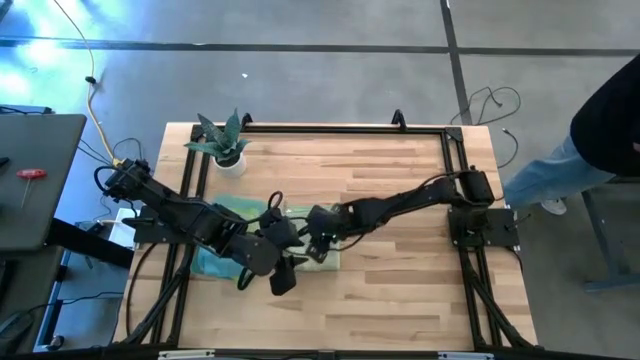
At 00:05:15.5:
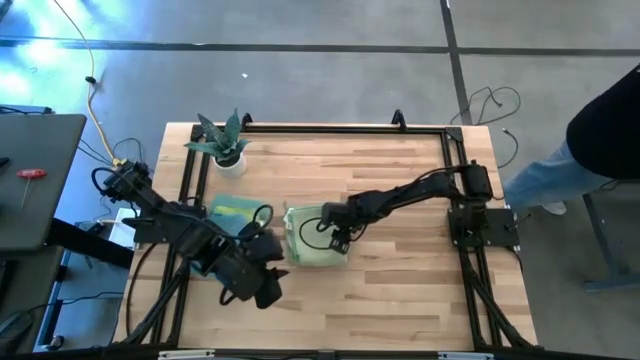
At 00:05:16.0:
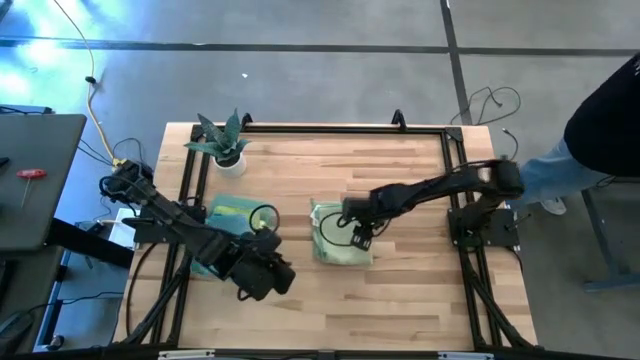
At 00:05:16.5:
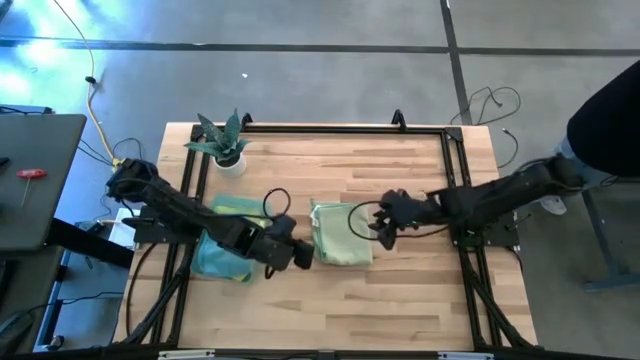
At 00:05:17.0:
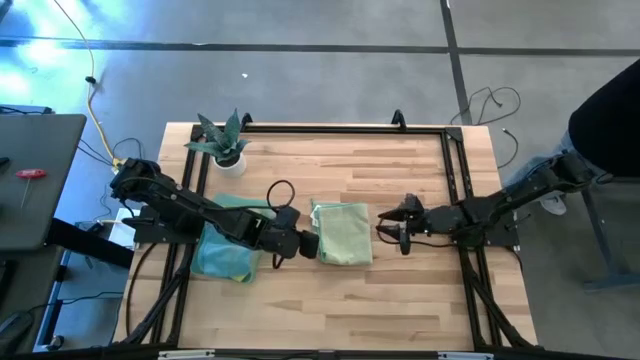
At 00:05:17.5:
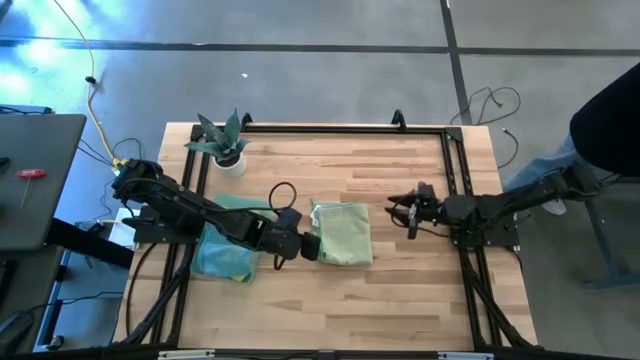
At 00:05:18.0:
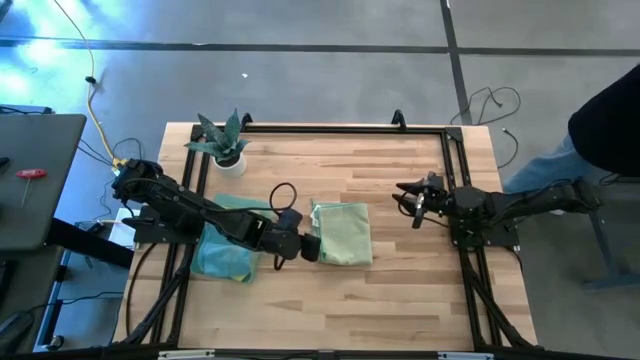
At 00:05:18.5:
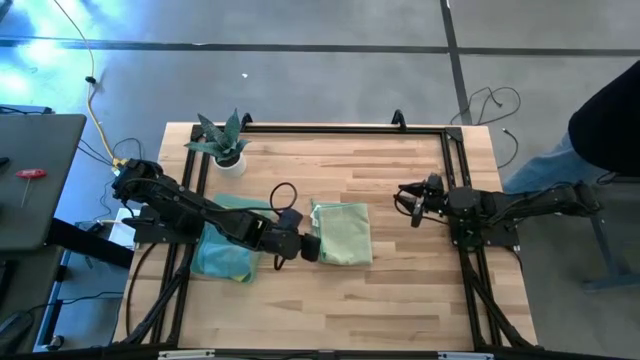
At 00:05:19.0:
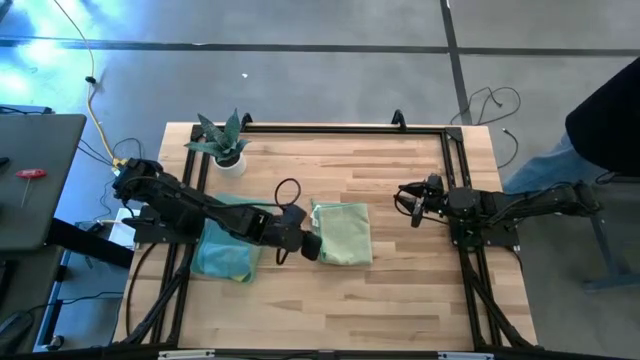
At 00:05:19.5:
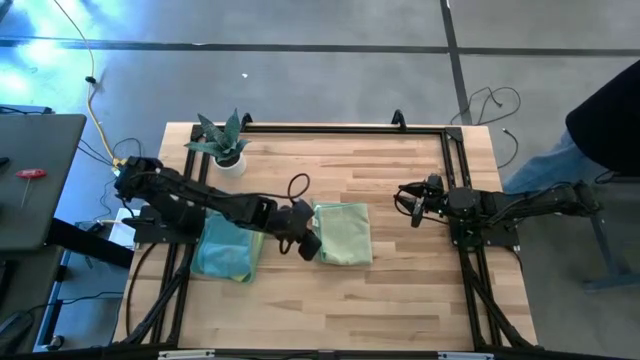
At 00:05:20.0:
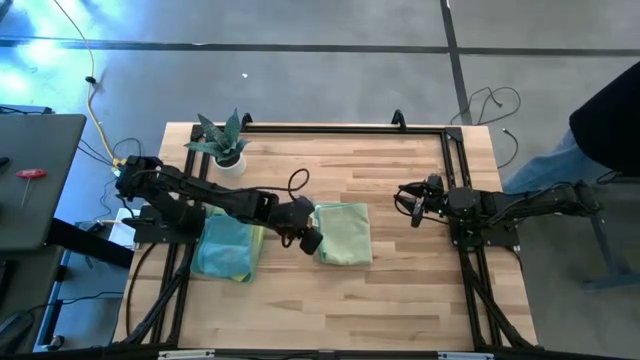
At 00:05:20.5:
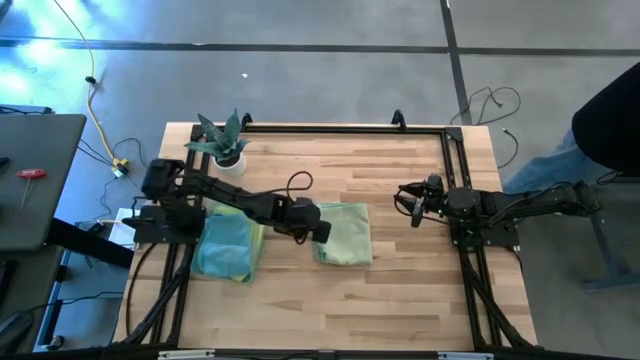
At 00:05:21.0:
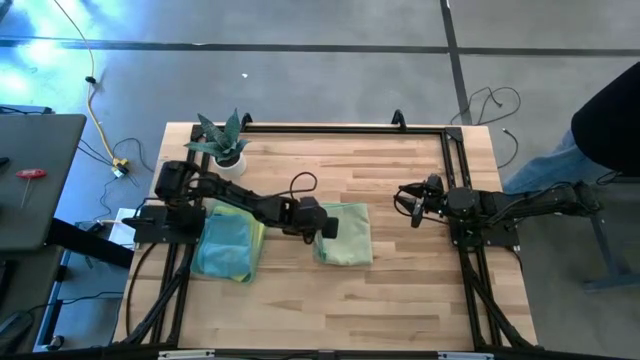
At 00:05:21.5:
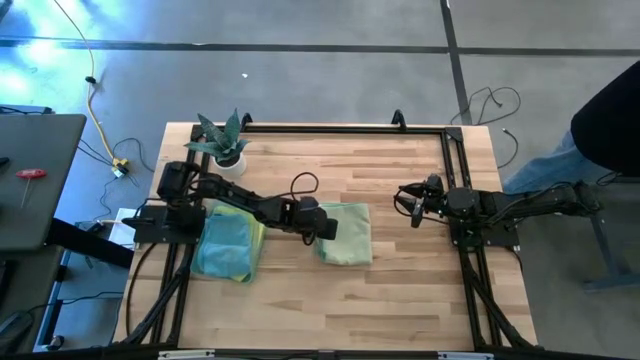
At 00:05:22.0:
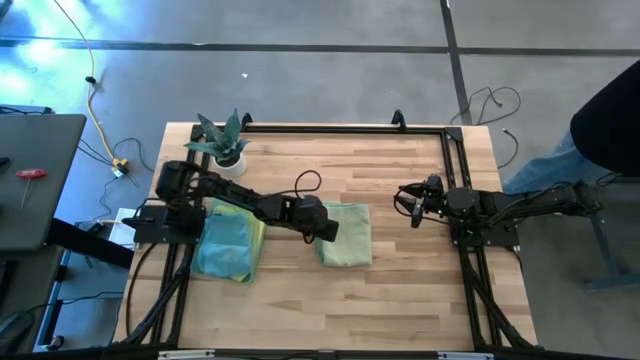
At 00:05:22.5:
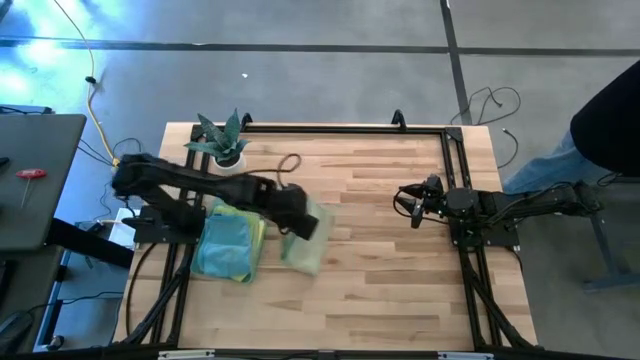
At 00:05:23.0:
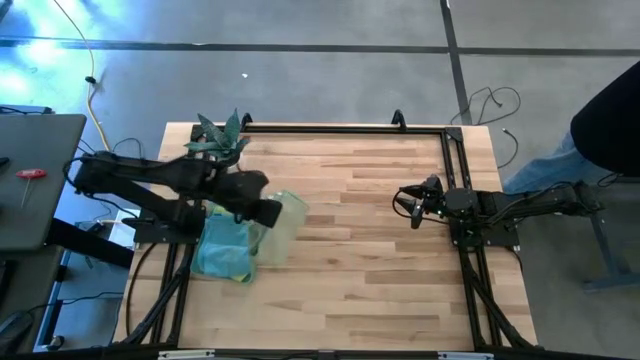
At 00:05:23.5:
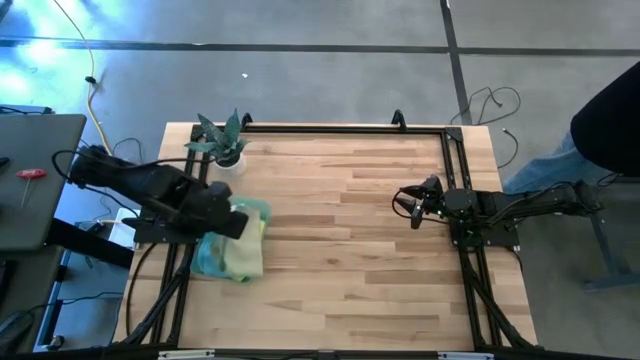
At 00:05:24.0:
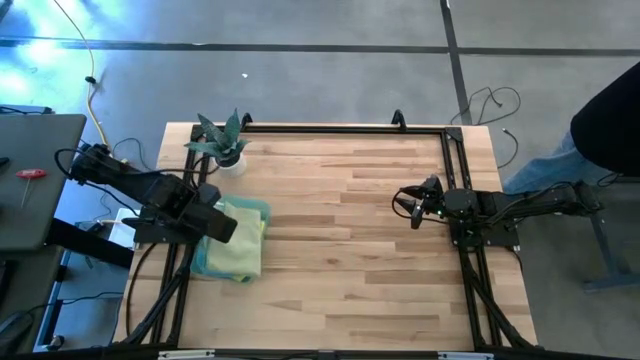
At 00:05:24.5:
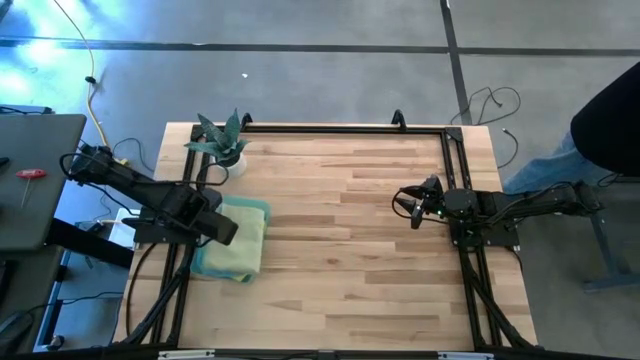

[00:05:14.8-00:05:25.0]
Task: Fold microfiber towels
Put the green microfiber towel into the green bin

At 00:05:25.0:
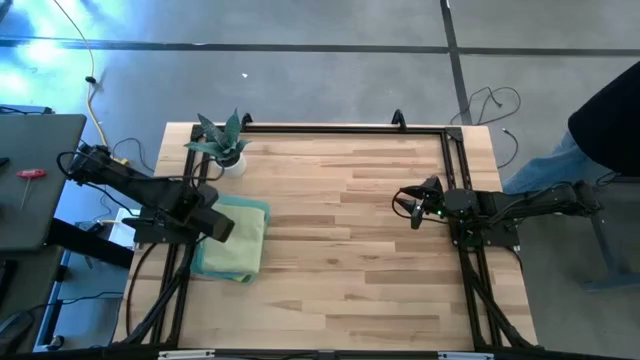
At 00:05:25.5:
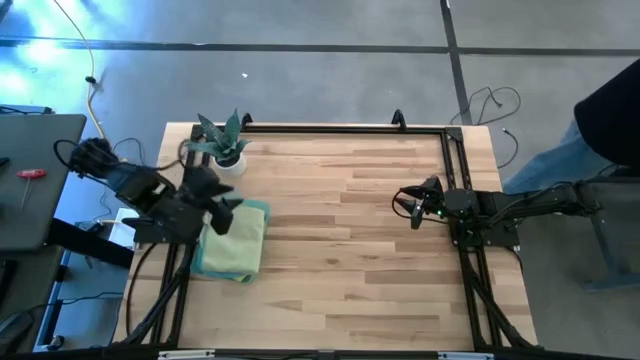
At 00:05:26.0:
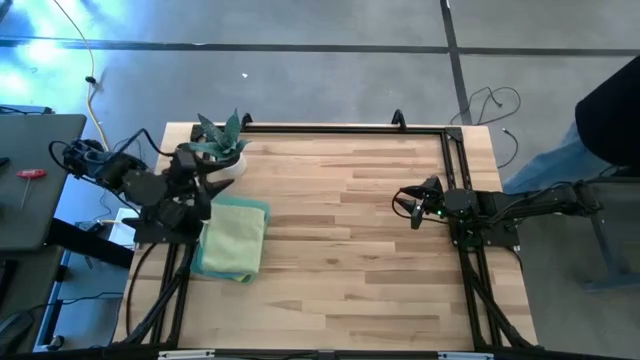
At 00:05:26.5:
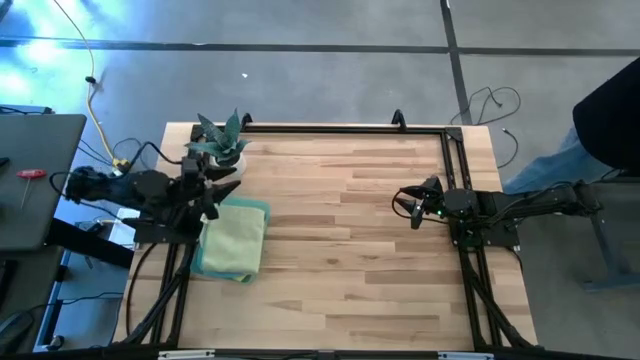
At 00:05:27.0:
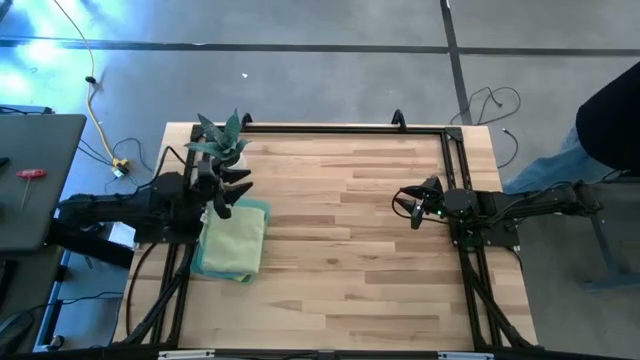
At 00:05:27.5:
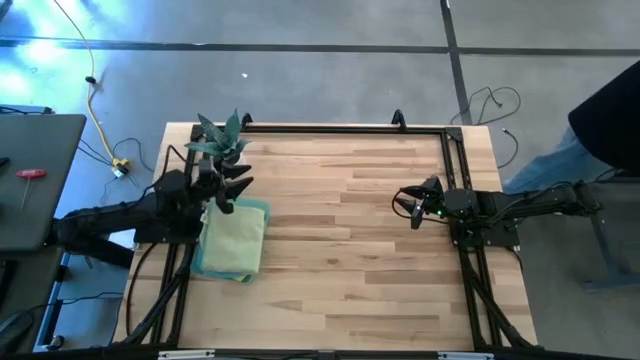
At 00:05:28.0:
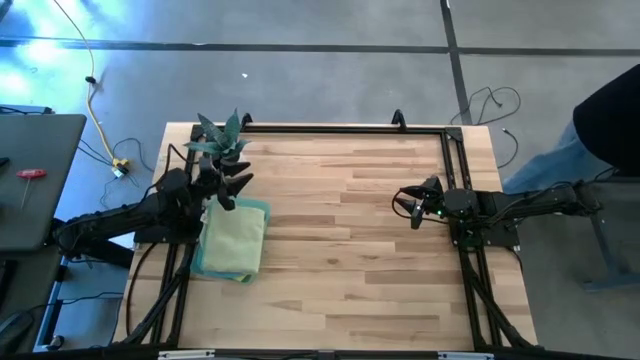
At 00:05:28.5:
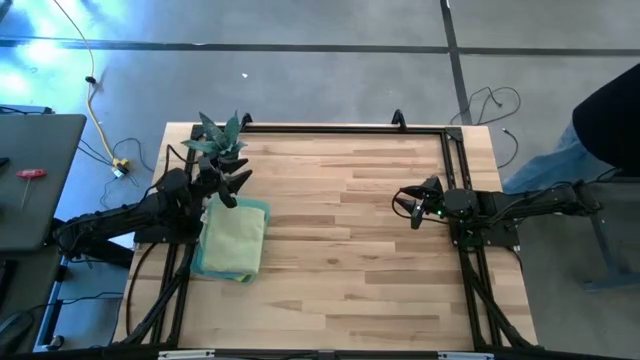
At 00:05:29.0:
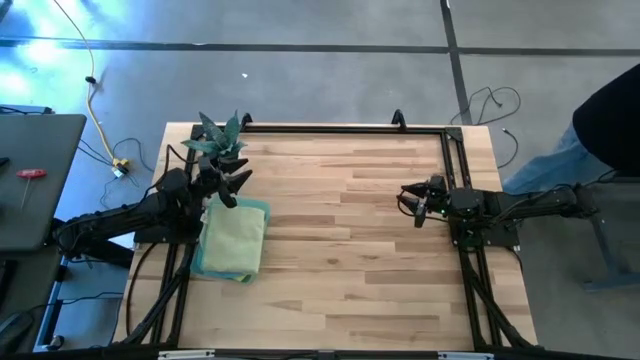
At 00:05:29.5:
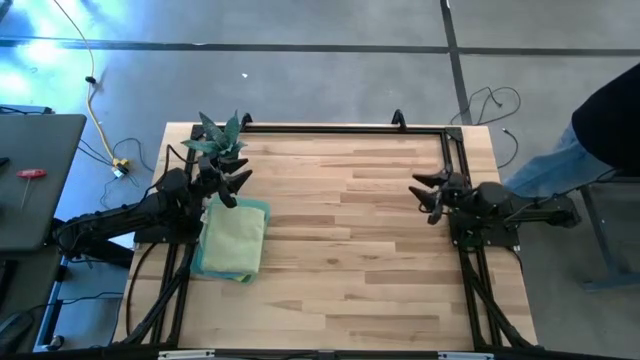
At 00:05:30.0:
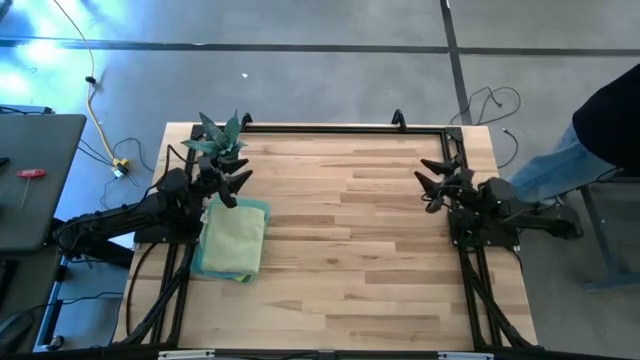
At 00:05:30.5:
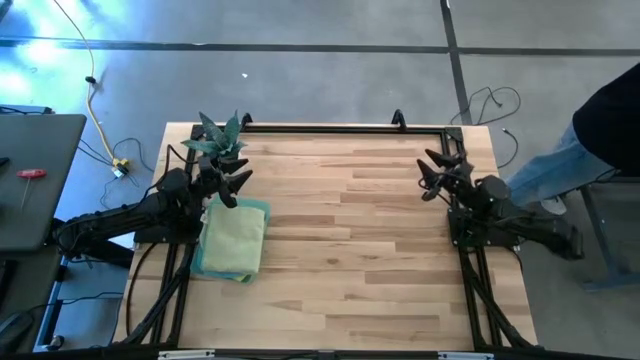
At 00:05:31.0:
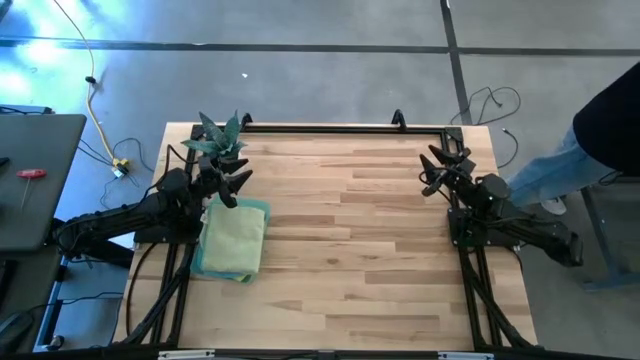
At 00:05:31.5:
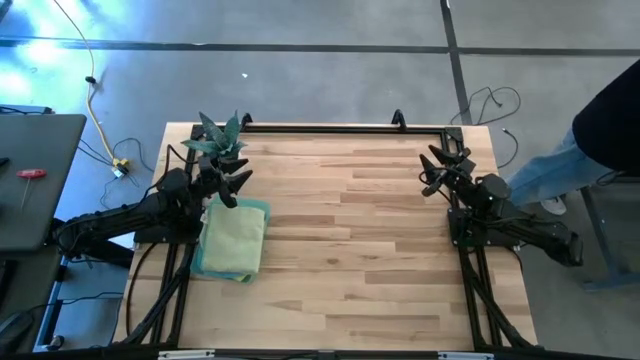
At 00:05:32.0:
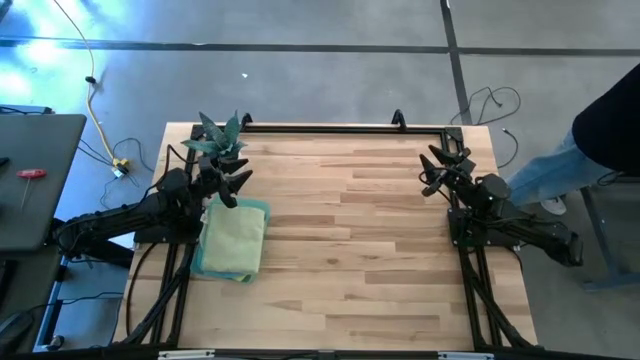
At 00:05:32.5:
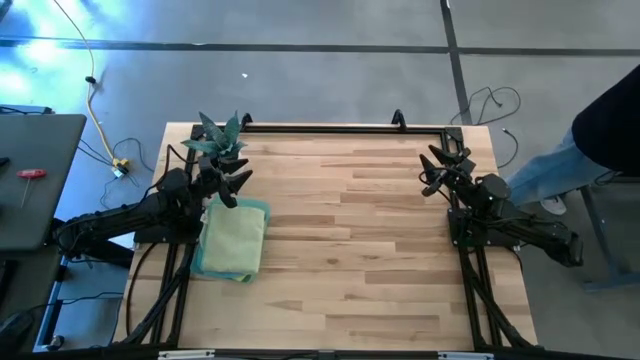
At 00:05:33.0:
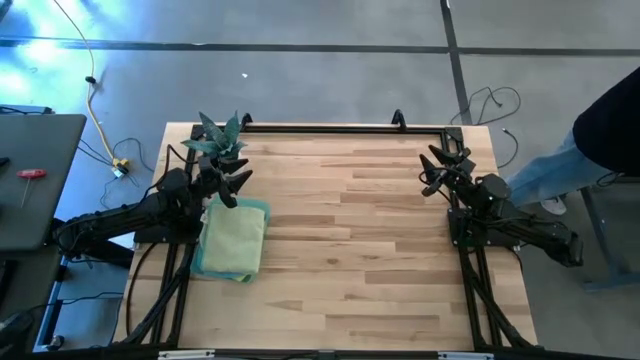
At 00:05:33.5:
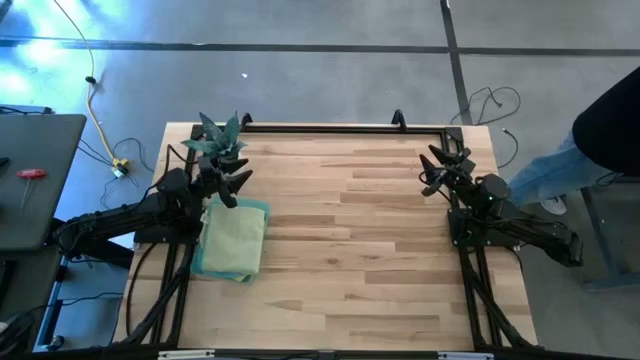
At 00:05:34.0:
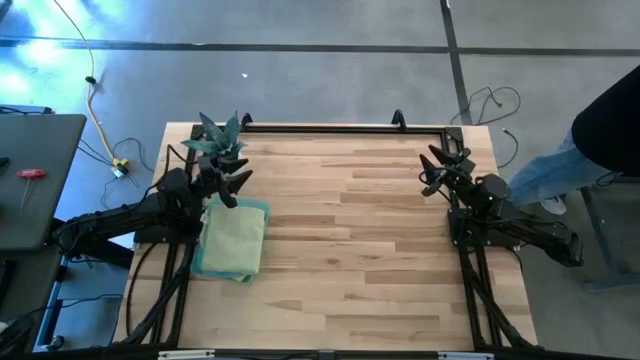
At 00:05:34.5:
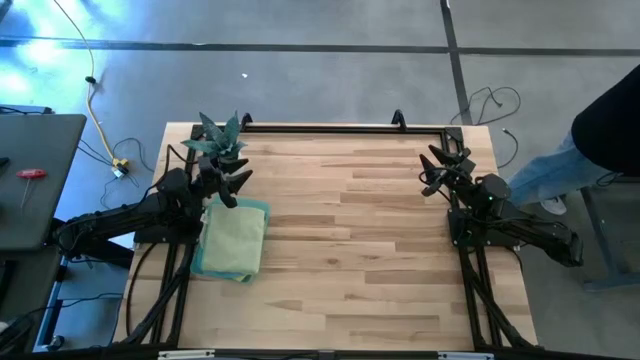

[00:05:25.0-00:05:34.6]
Return to Home Position
